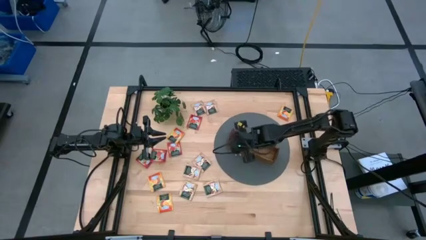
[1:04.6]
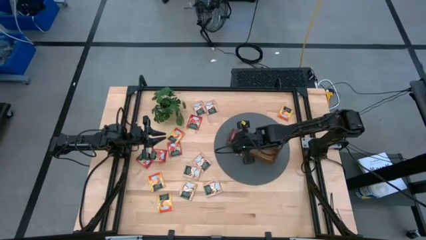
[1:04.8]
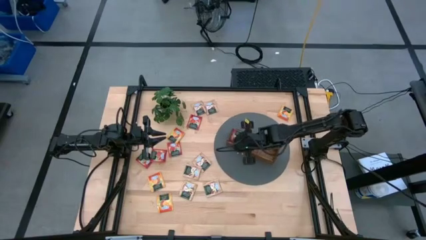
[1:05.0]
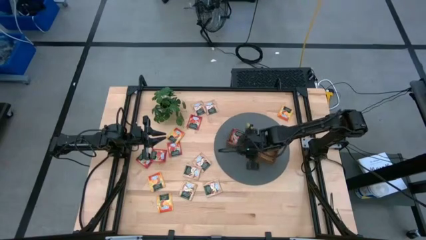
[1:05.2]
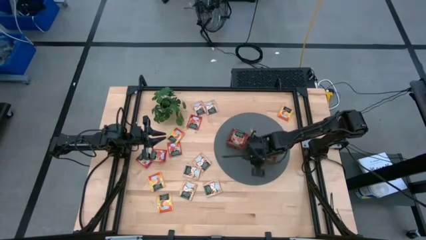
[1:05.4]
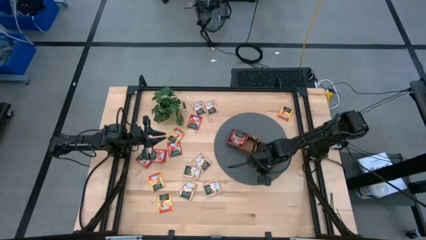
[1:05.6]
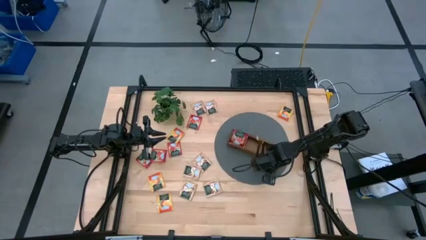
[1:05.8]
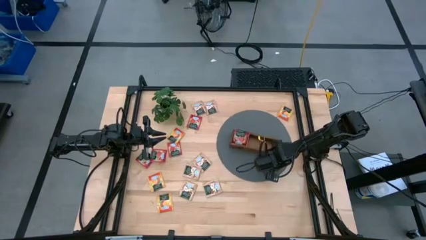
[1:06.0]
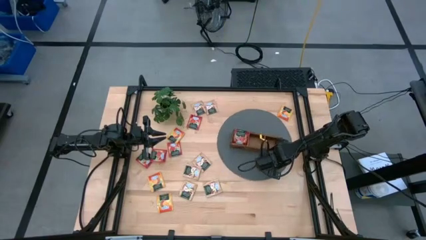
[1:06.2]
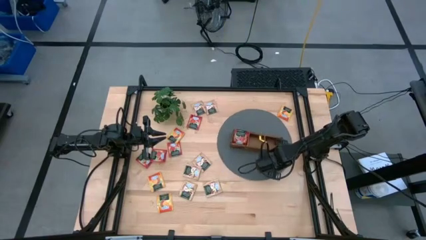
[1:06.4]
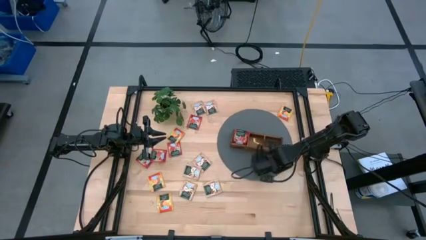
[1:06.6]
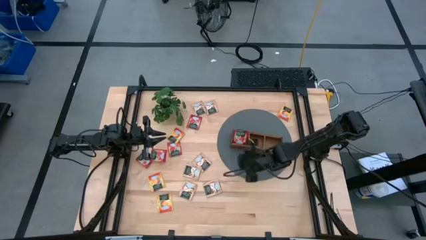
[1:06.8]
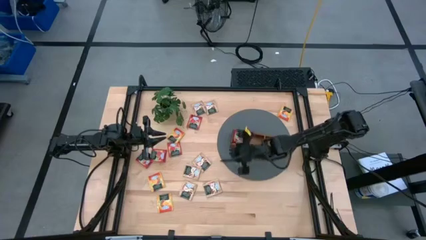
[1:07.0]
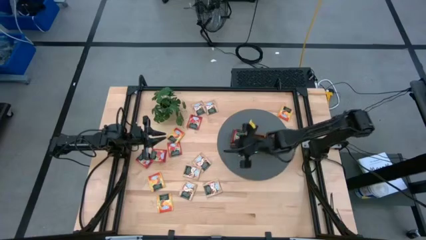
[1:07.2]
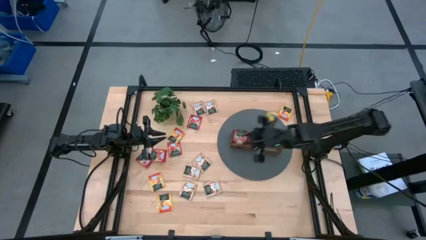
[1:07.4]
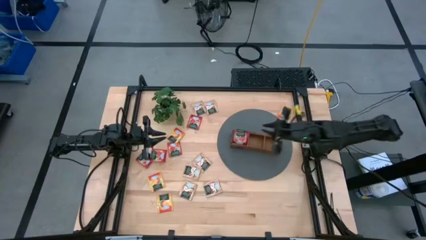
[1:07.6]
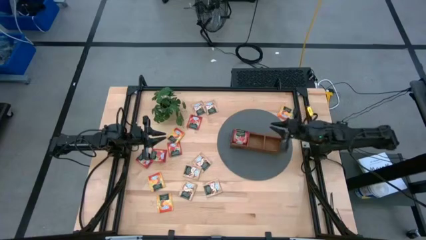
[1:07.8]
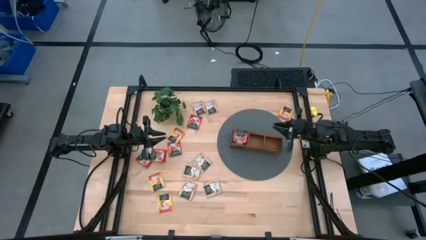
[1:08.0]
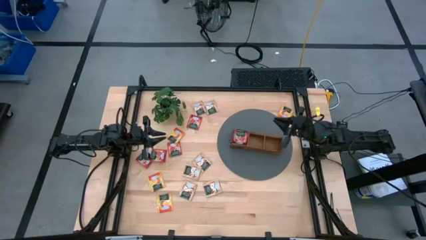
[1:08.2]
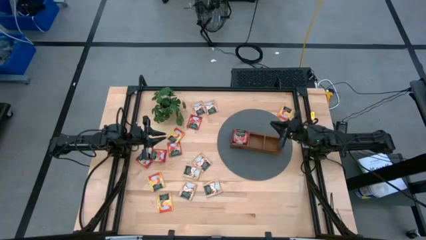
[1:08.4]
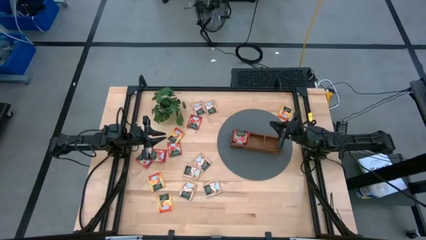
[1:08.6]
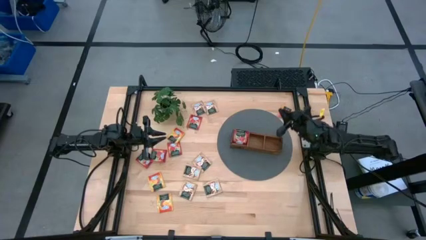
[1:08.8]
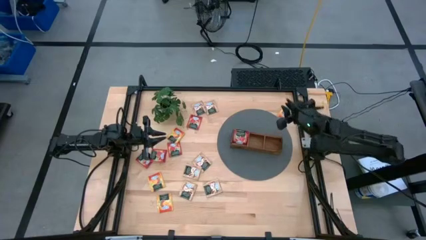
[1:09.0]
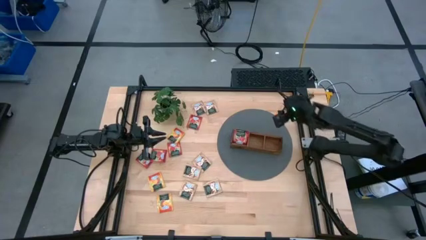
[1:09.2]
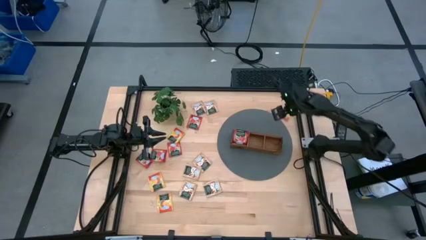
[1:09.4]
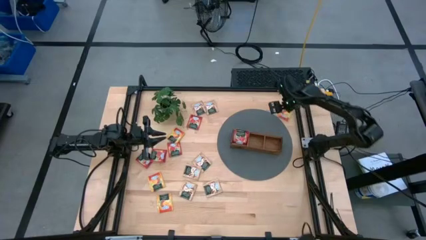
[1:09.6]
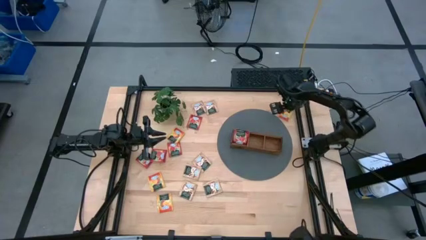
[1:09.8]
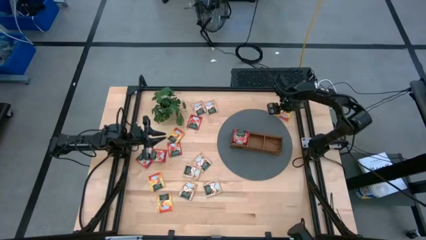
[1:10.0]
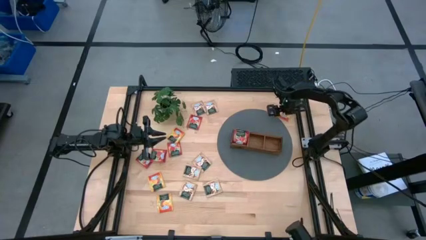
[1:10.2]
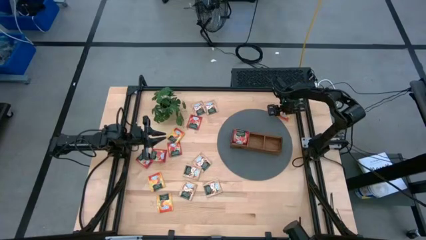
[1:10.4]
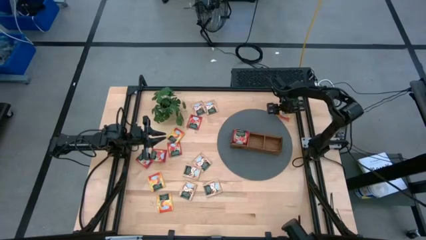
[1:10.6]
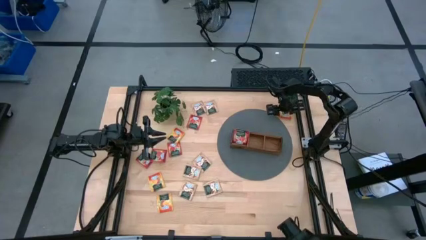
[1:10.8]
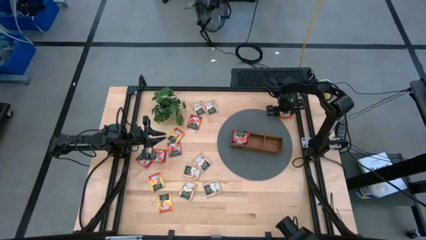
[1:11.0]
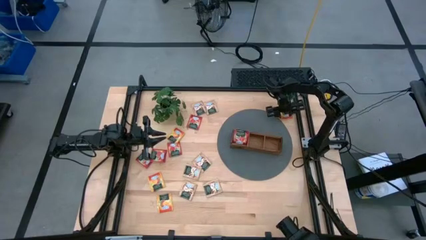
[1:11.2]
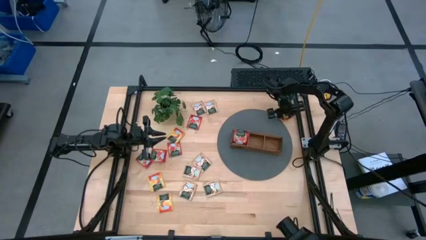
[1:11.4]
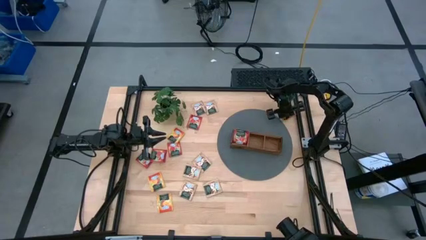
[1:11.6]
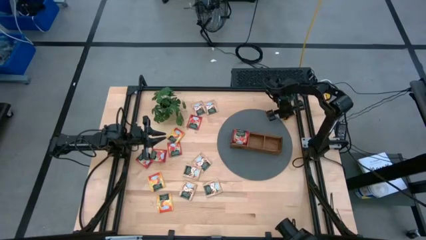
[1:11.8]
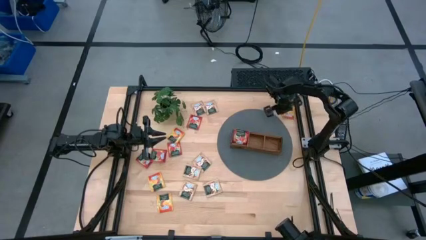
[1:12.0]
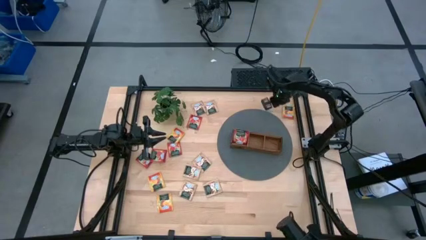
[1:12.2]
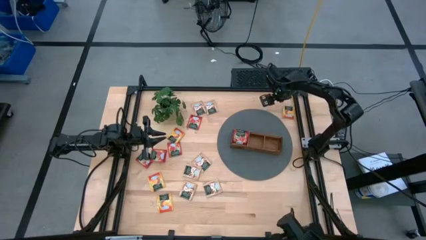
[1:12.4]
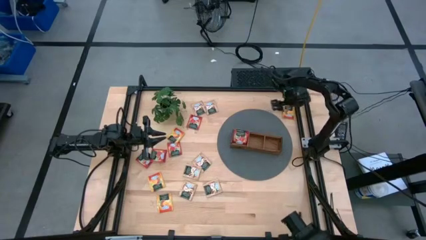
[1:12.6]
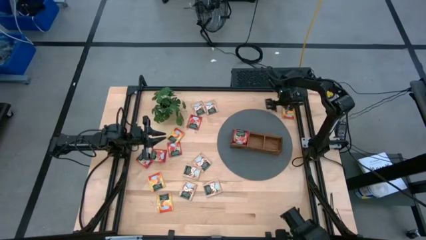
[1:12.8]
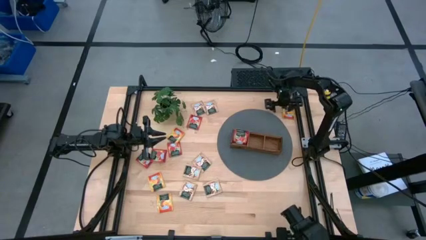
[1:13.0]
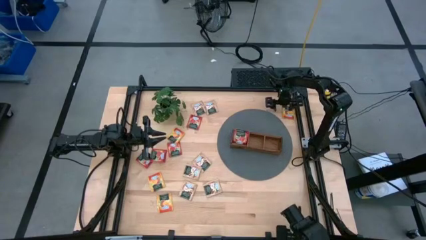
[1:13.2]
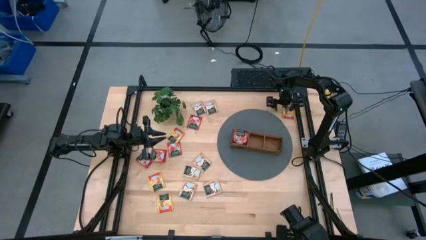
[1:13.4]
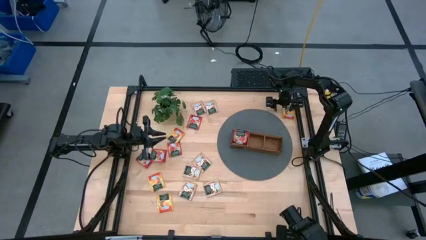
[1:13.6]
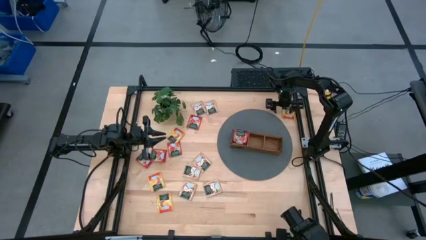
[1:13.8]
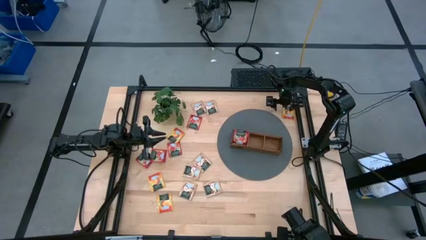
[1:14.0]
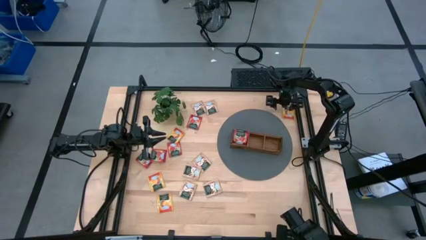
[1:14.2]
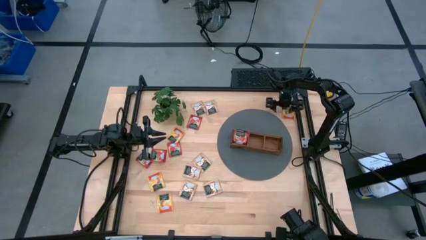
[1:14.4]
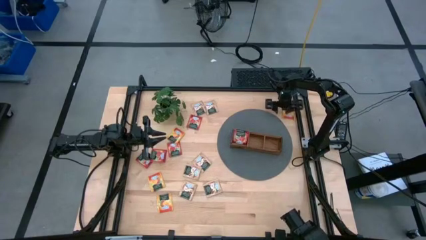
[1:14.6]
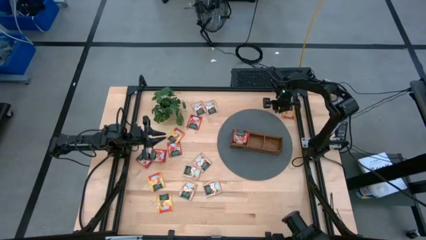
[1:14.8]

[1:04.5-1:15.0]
Task: Pick & Place Tea
Put the yellow tea bag into the middle section of the wooden organizer

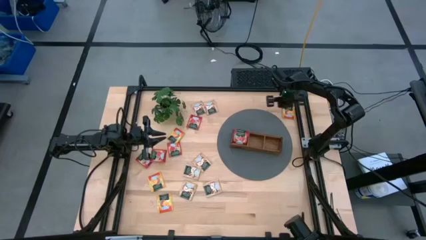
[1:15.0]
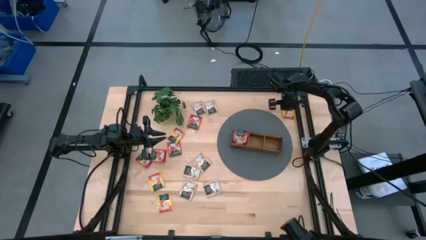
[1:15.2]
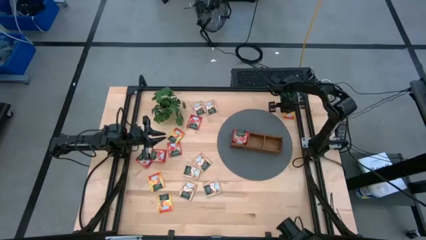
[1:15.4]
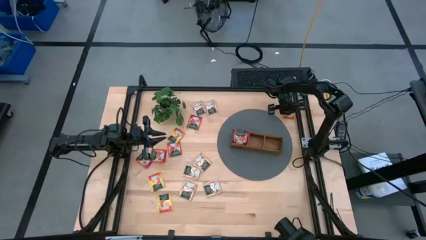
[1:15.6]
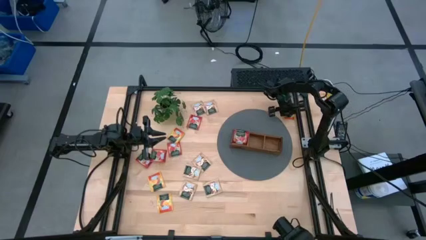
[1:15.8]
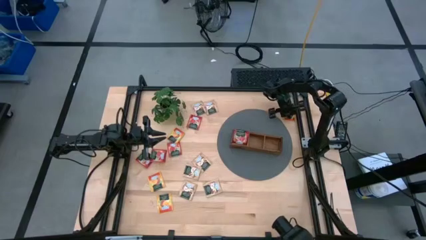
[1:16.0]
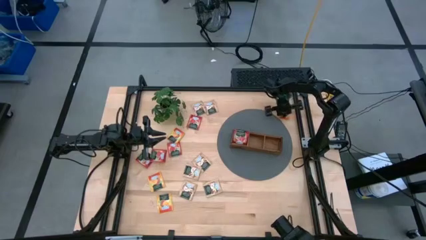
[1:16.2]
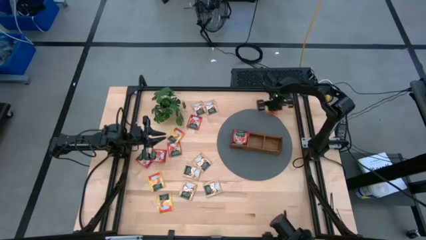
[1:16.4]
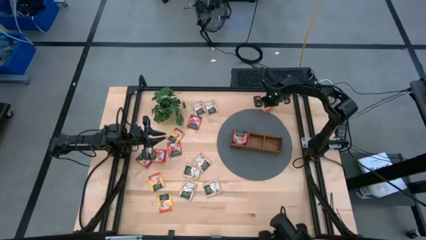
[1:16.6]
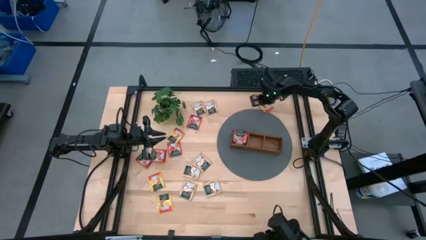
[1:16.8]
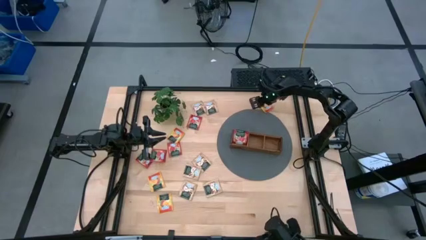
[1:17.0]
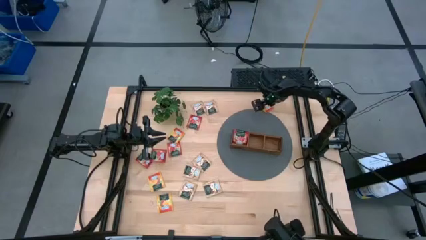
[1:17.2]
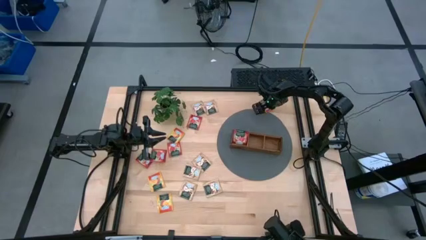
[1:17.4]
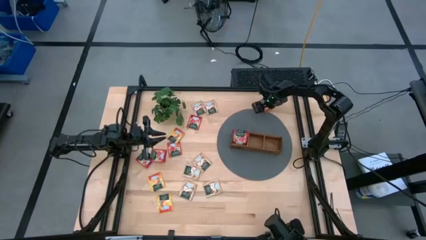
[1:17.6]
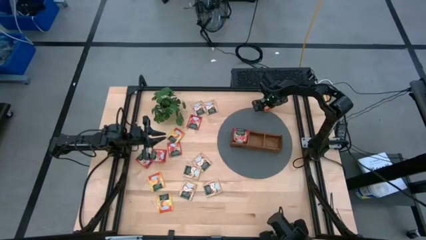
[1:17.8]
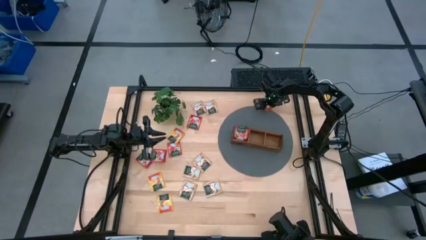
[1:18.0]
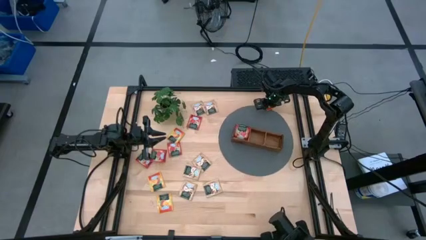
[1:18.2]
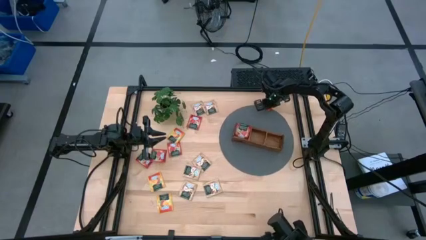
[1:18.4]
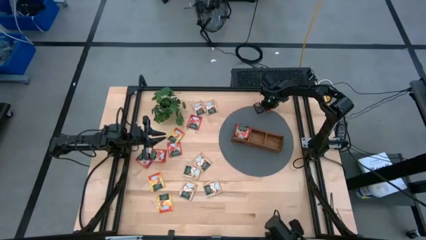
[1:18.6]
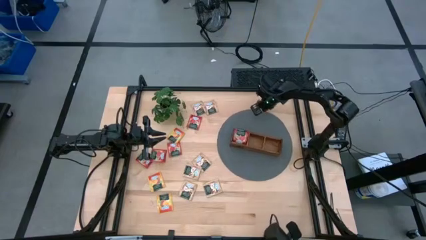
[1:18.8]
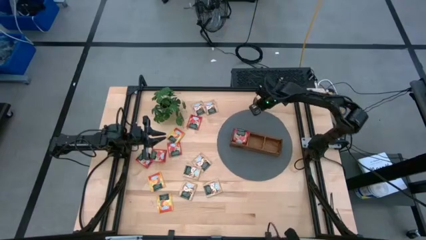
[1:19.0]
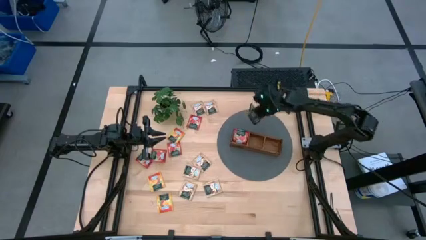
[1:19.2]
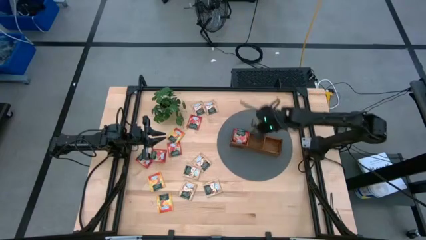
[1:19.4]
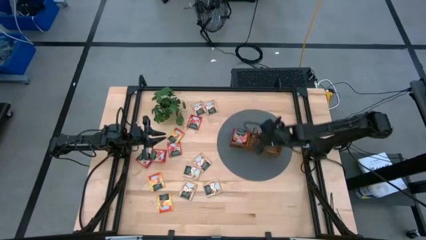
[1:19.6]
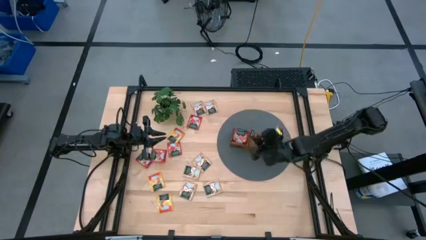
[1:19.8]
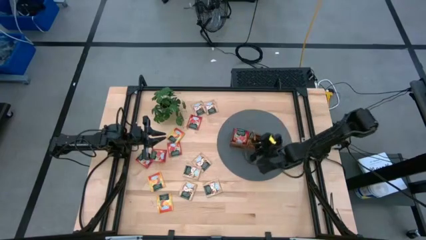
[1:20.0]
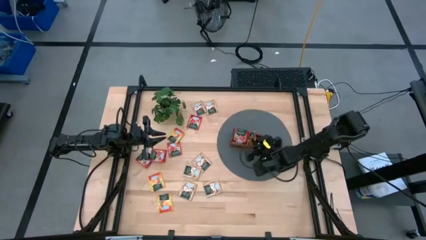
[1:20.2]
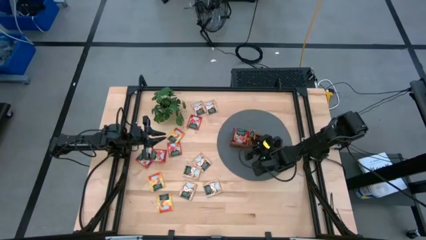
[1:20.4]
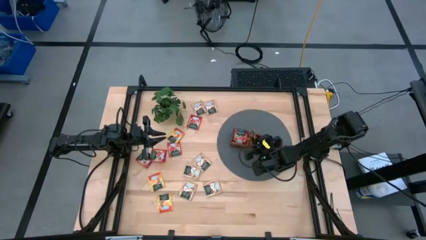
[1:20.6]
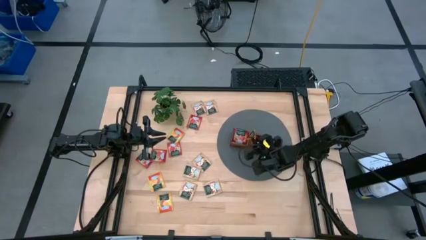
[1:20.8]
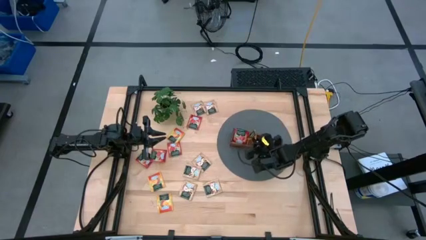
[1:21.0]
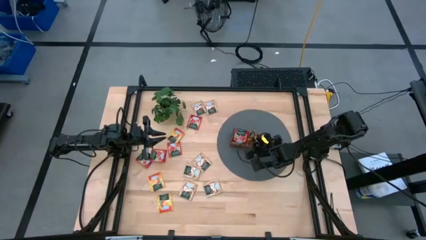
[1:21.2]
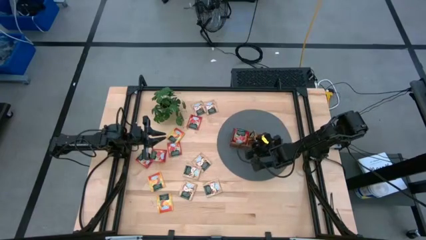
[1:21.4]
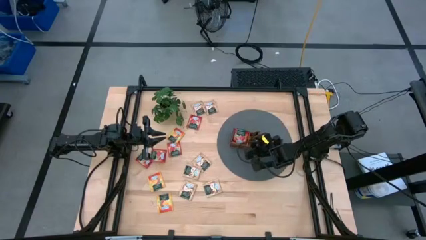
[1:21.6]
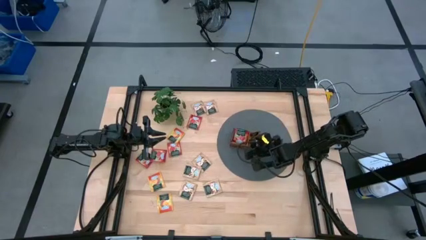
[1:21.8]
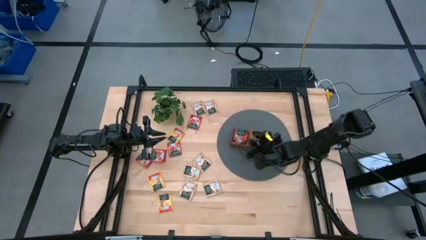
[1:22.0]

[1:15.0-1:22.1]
Put the yellow tea bag into the middle section of the wooden organizer
